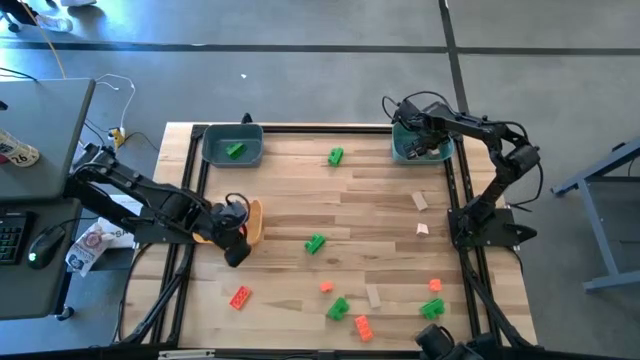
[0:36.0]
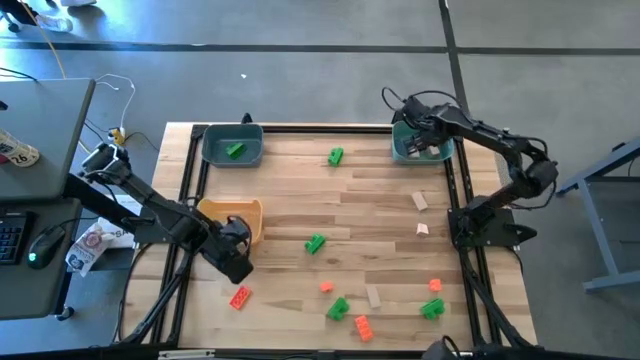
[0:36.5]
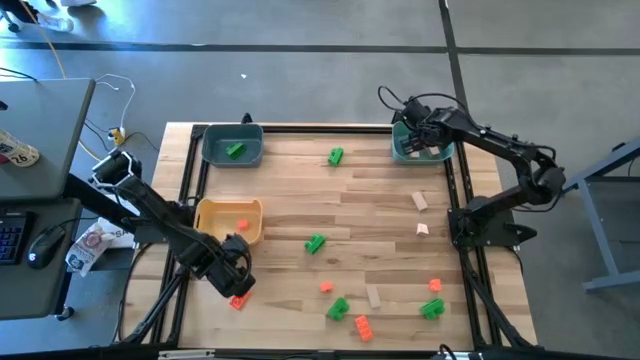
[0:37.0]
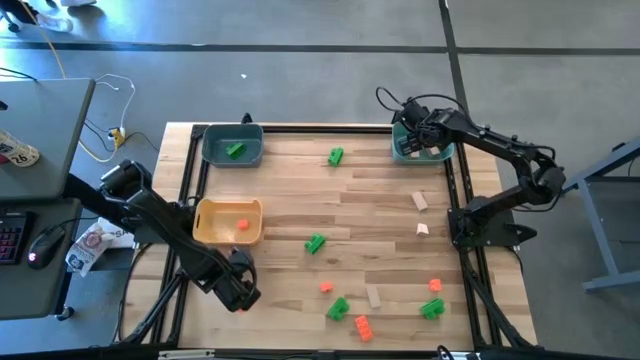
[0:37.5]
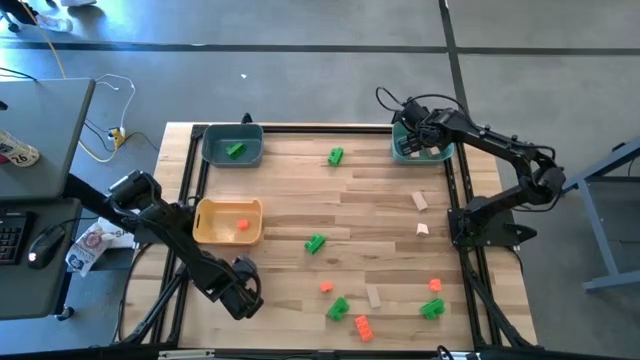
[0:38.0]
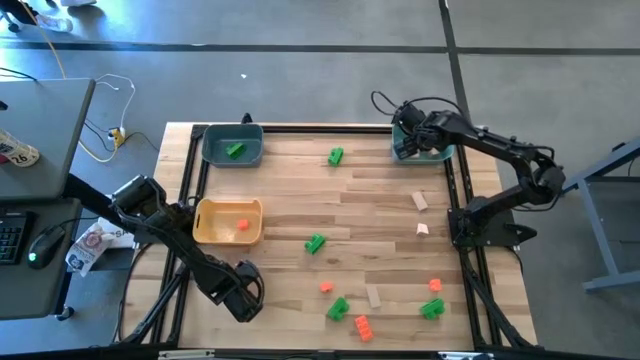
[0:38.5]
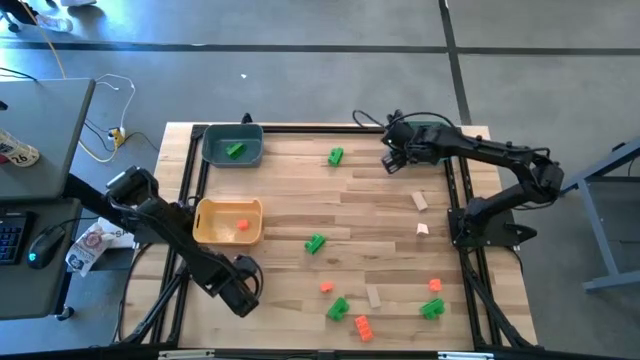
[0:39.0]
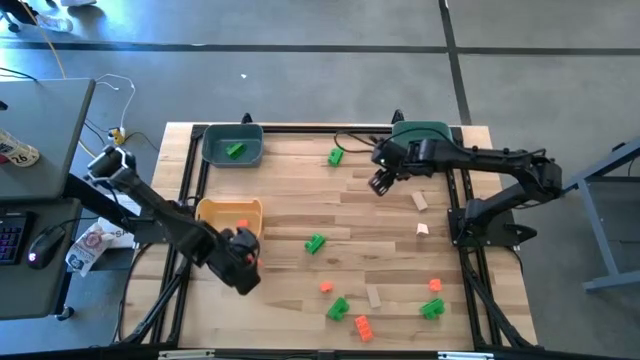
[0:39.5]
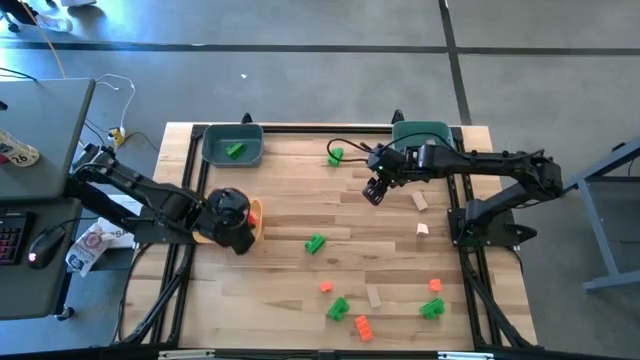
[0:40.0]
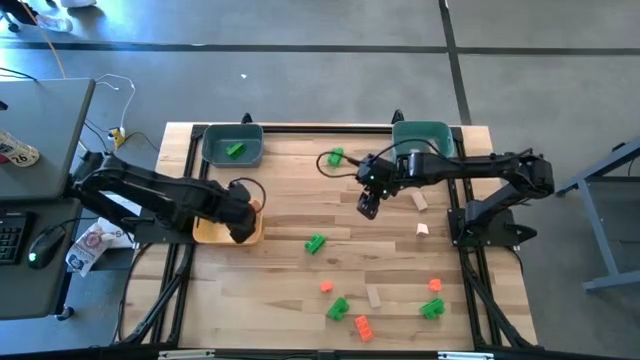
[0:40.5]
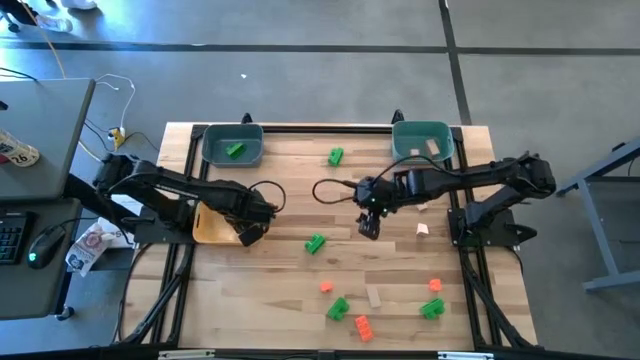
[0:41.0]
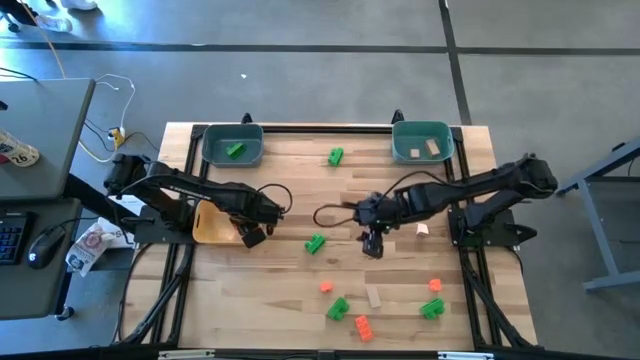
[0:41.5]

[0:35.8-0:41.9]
Task: Sort & place blocks by color
Put the orange game piece into the yellow bin

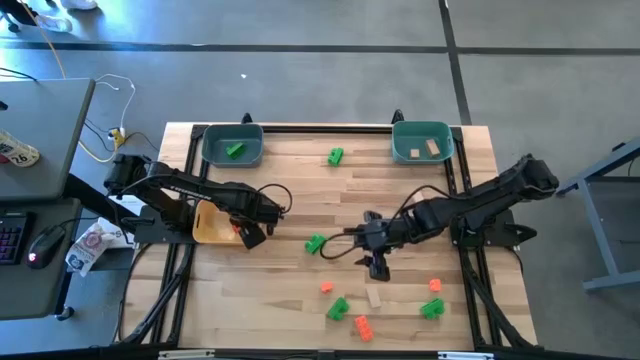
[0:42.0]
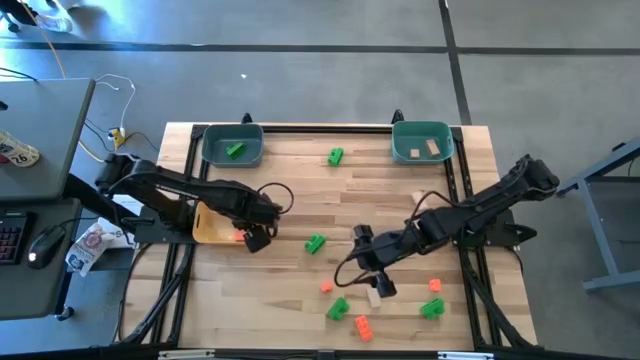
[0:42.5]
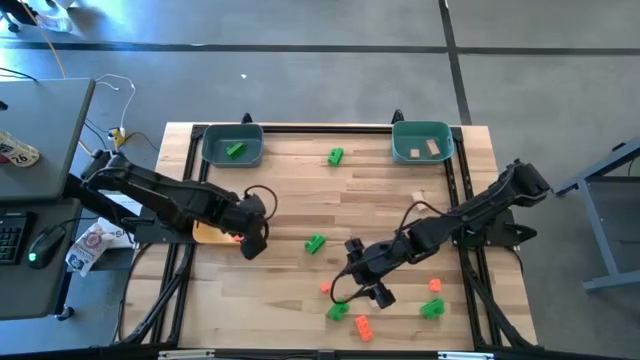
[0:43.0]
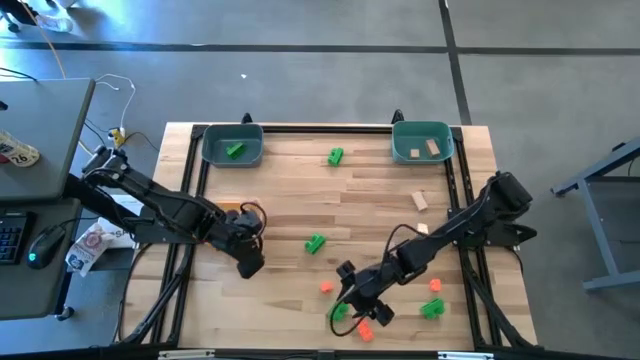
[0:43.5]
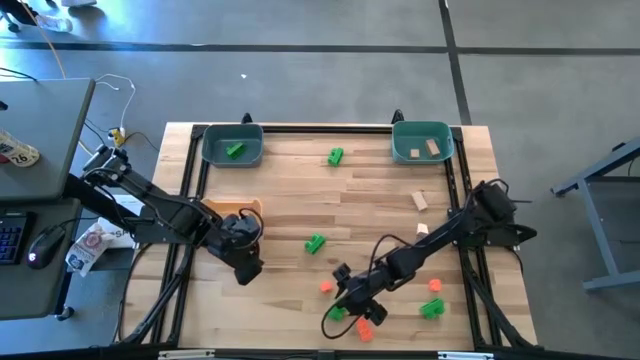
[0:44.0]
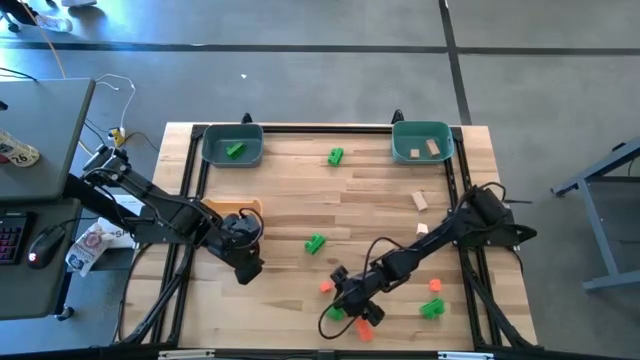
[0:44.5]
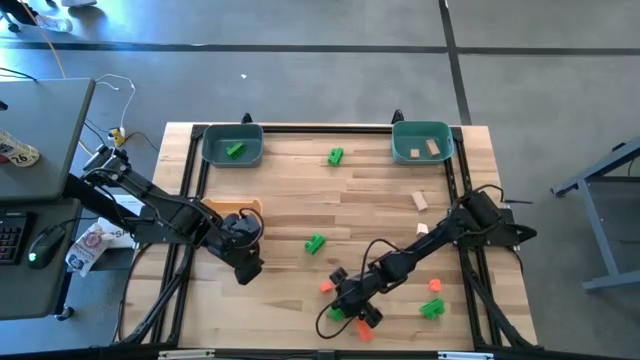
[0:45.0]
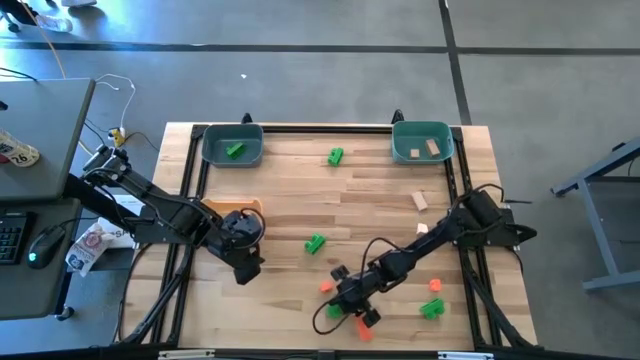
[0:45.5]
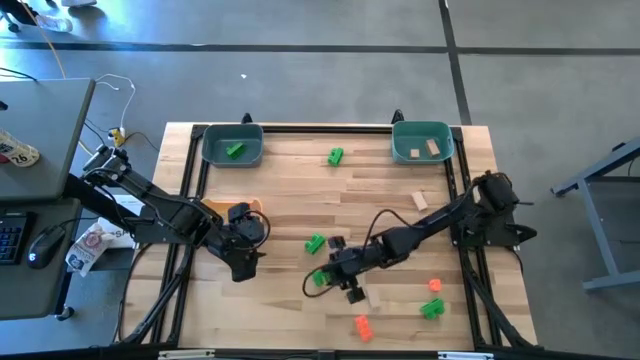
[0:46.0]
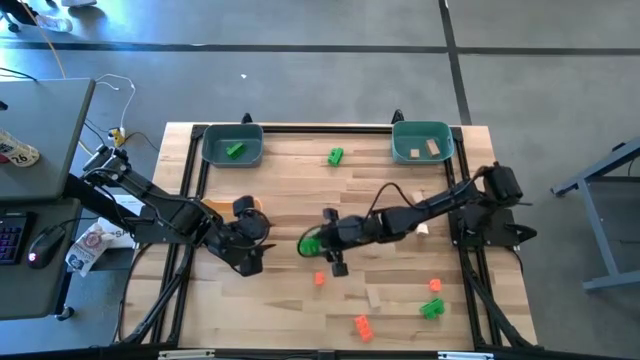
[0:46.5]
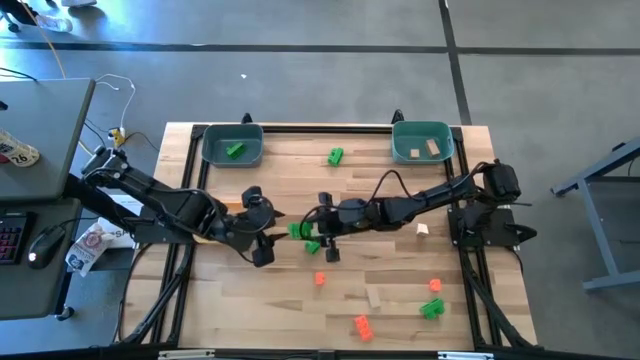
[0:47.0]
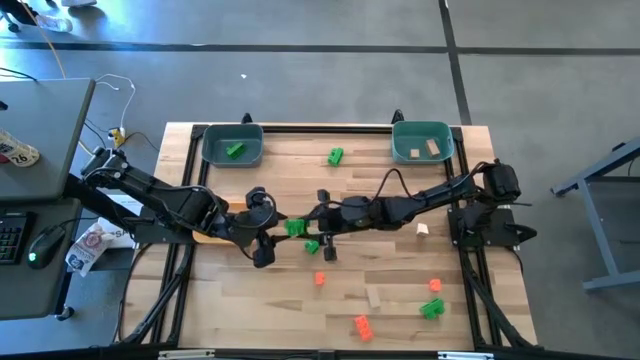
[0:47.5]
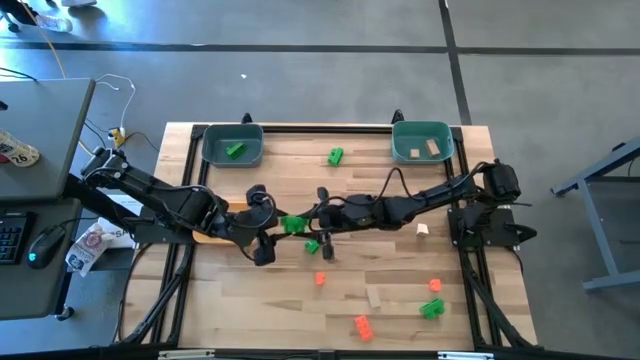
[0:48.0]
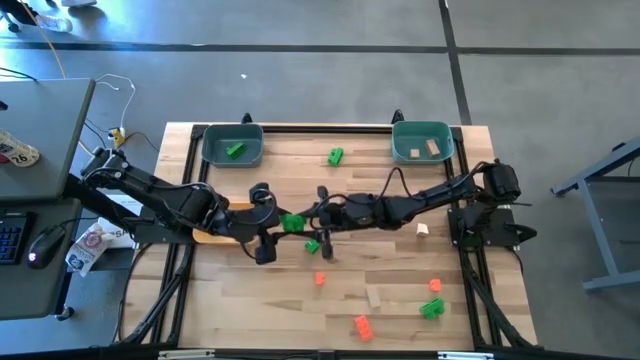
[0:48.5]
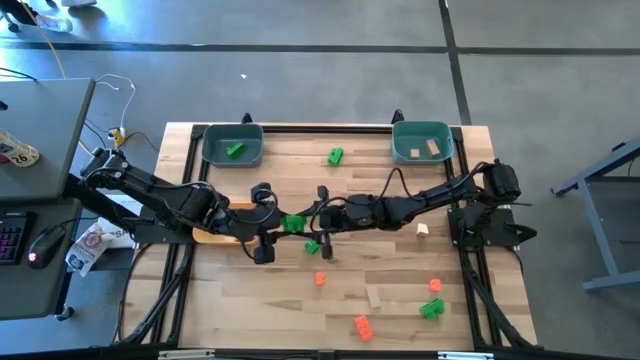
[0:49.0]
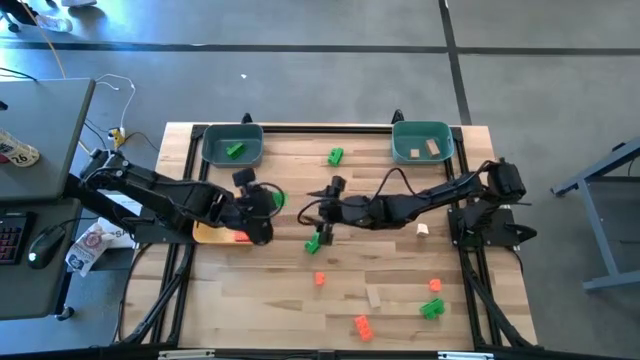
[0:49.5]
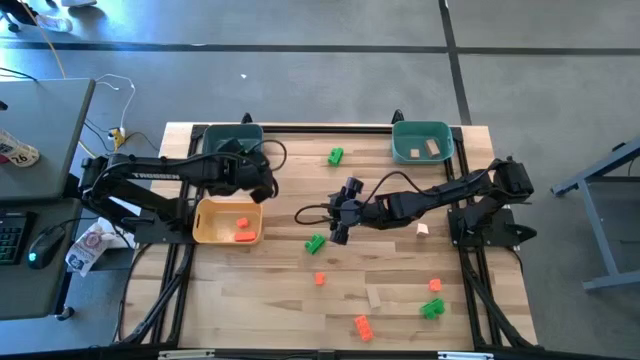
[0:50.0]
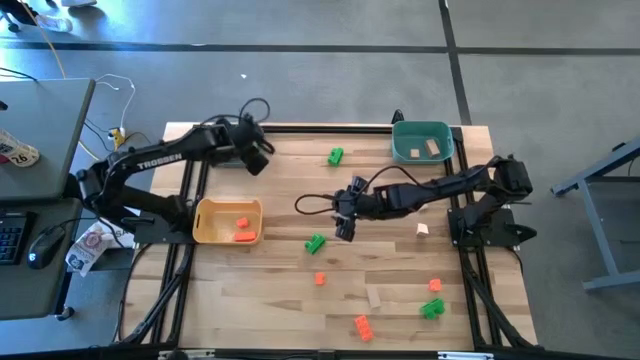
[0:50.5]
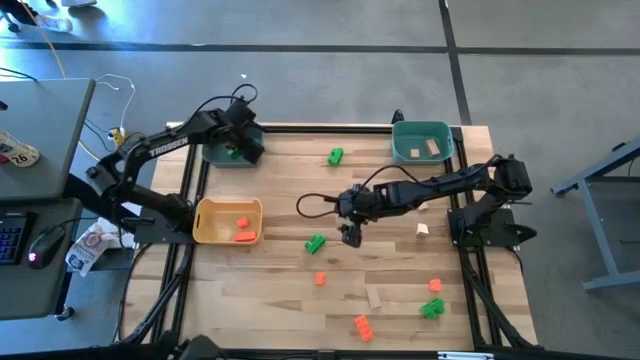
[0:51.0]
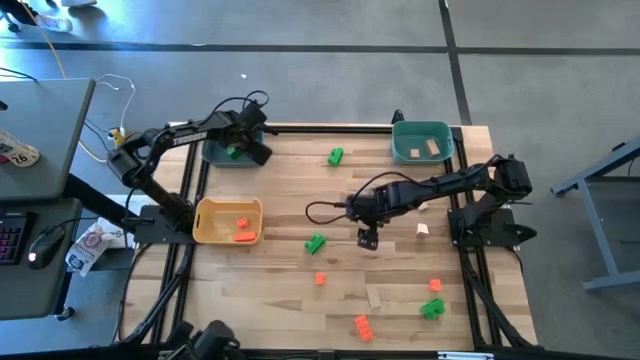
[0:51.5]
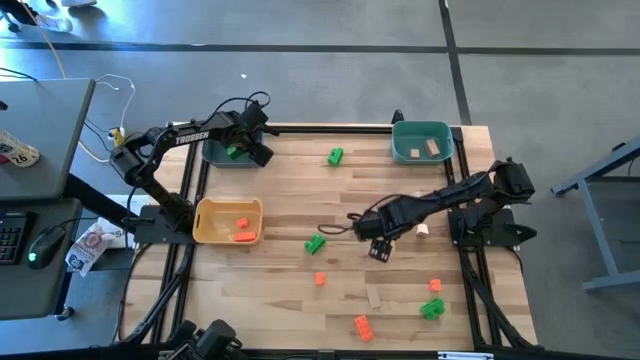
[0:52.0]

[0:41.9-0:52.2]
Put the green game piece into the blue bin

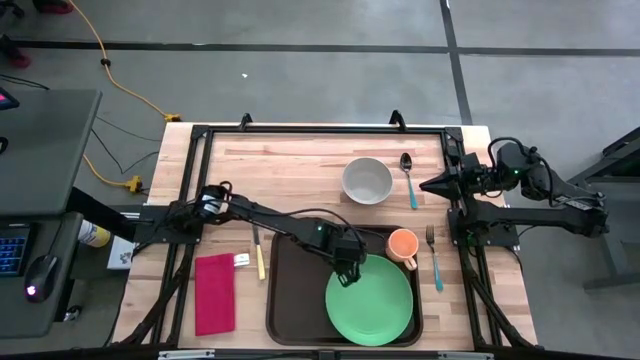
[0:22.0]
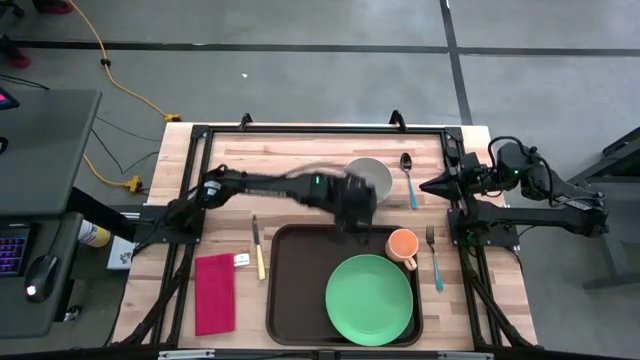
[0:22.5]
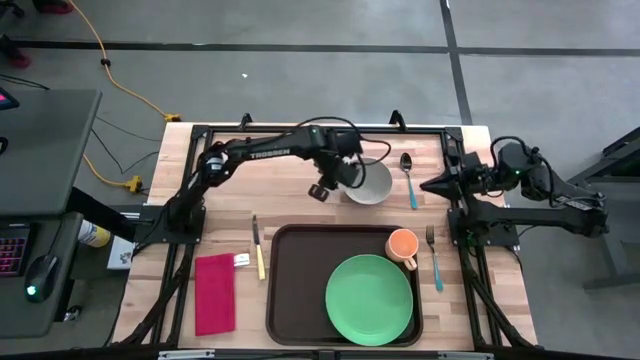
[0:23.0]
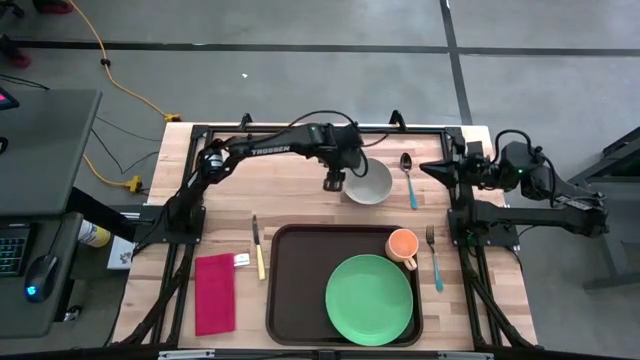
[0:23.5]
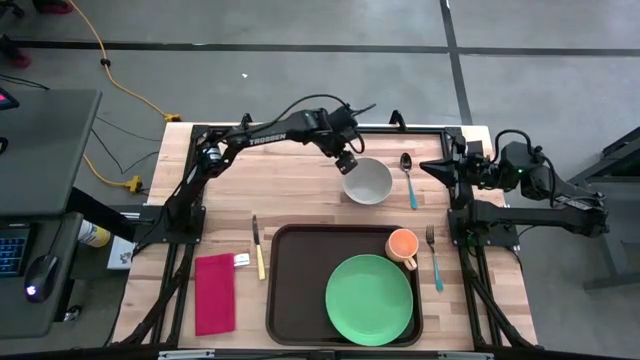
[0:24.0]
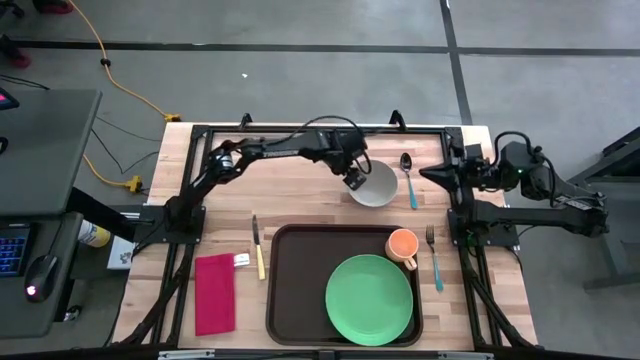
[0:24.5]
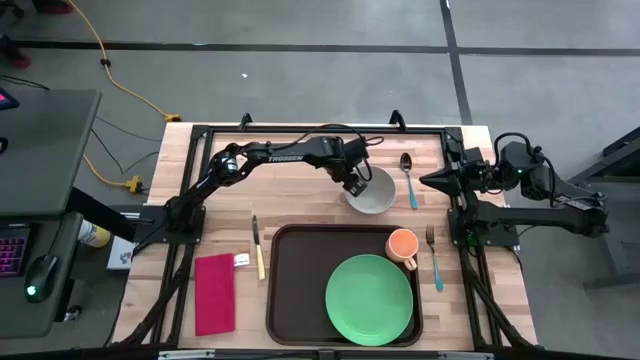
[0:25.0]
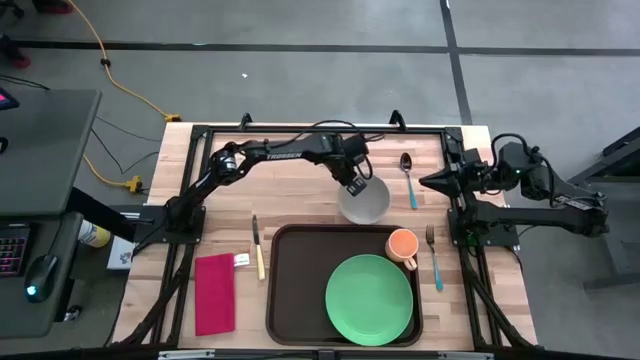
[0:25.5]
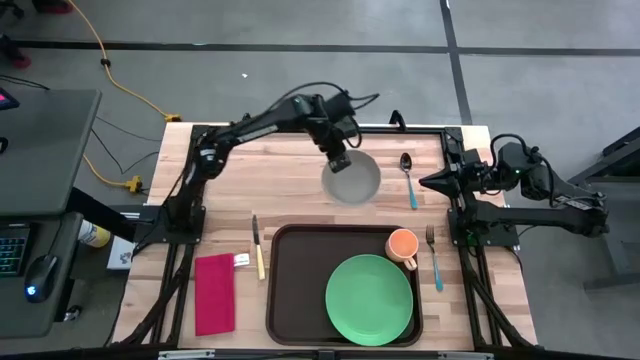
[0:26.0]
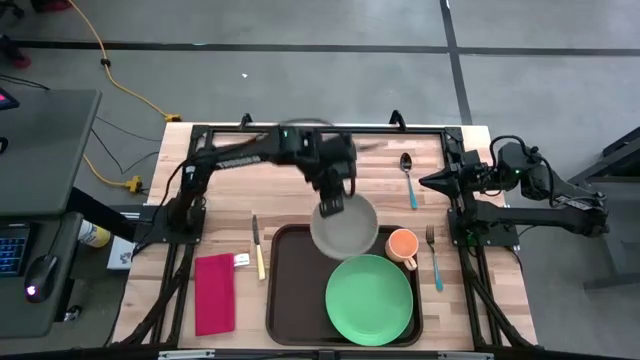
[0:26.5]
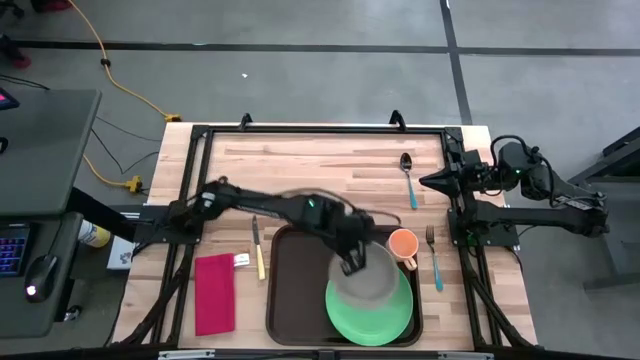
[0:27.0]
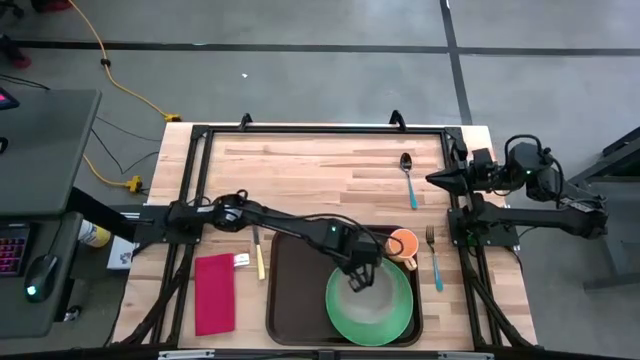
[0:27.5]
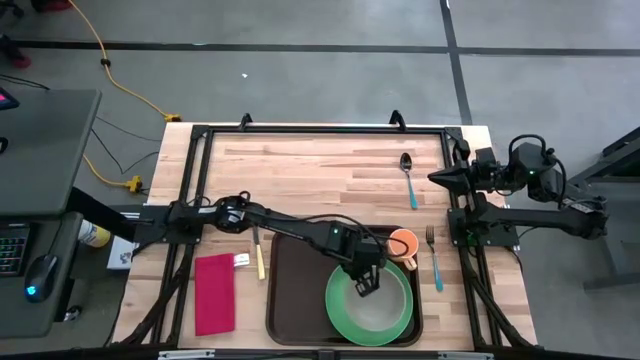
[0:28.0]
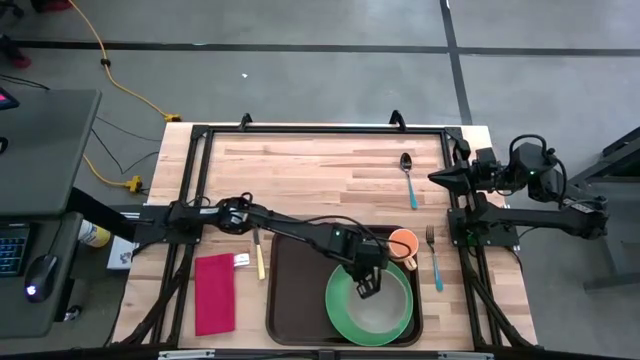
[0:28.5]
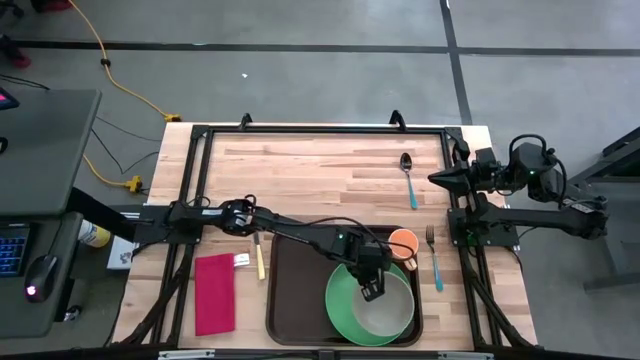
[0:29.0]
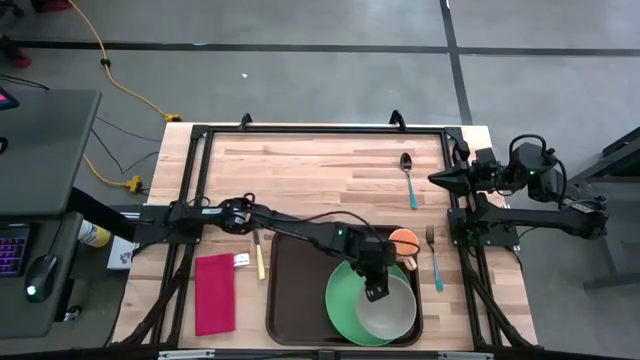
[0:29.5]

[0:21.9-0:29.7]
Task: Set up tray
Put the grey bowl on the green plate
